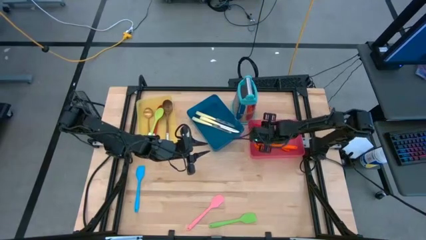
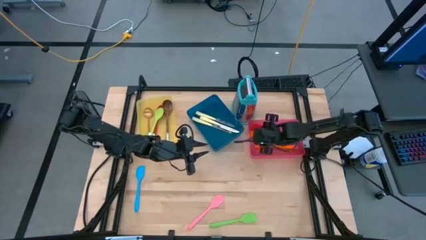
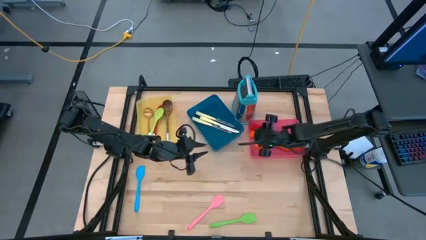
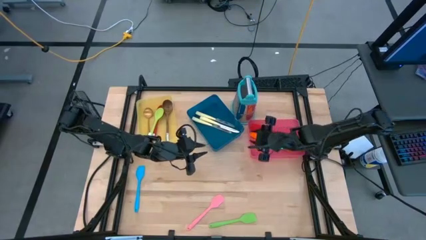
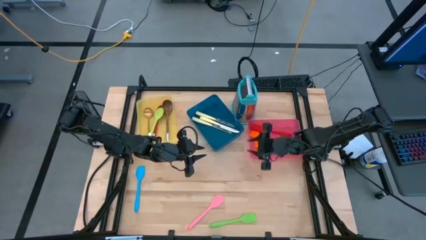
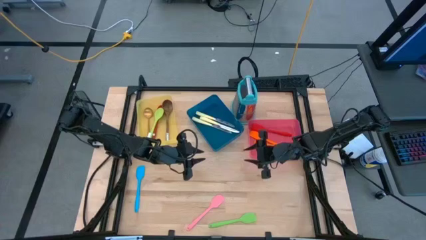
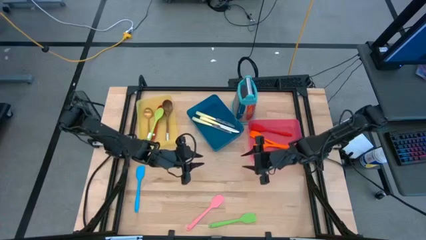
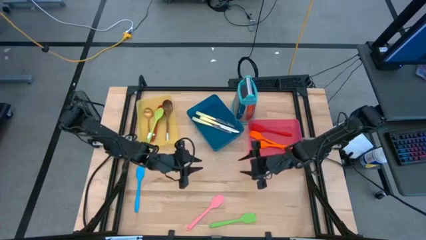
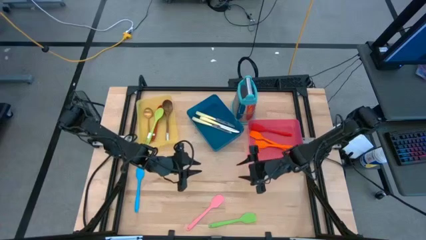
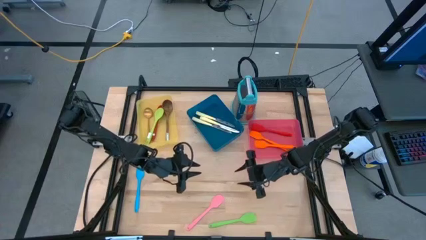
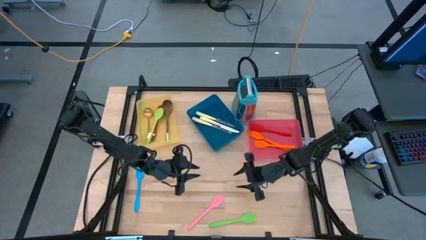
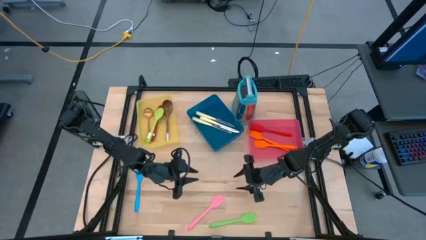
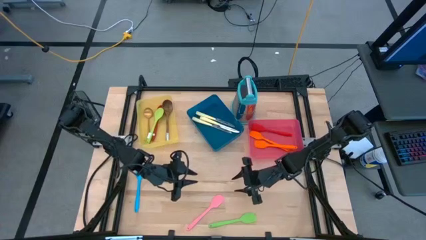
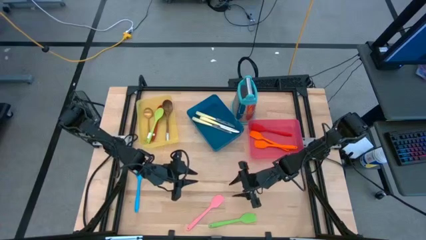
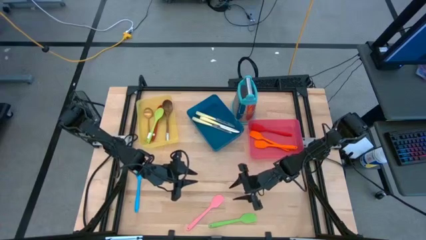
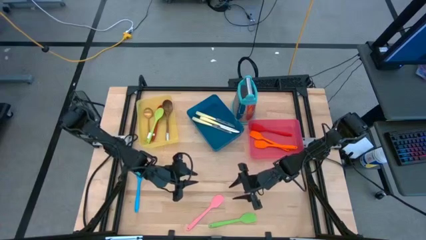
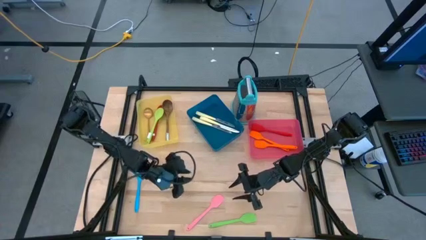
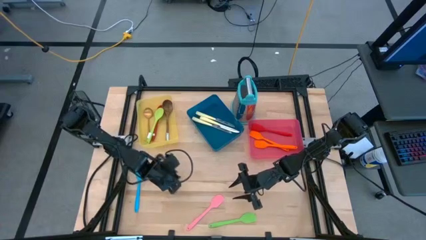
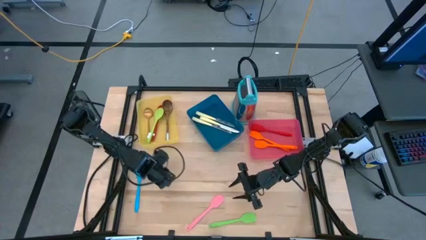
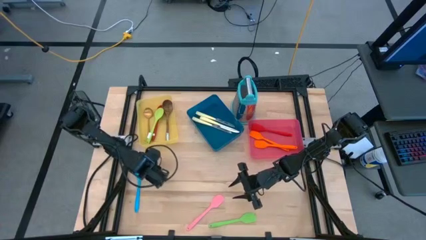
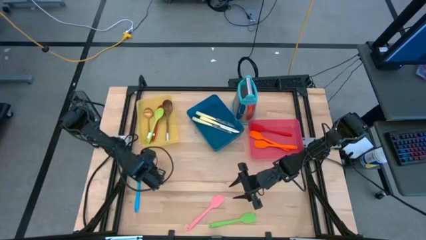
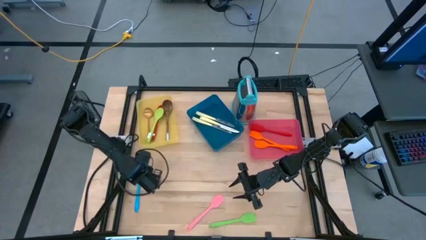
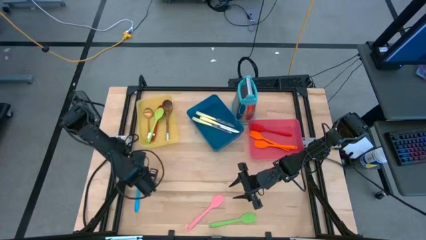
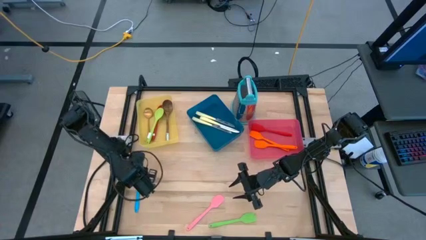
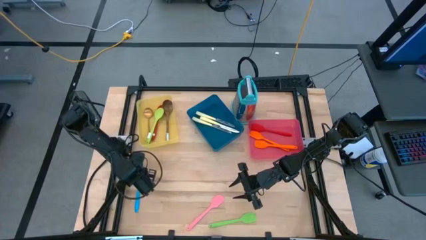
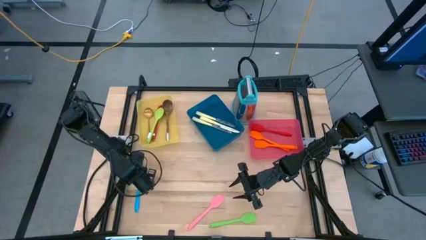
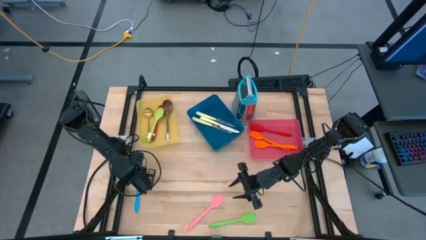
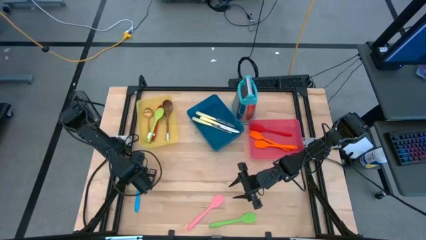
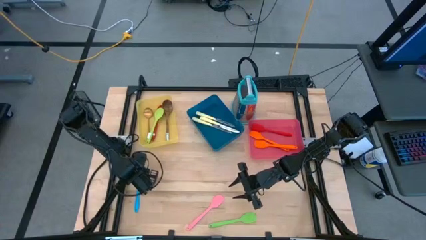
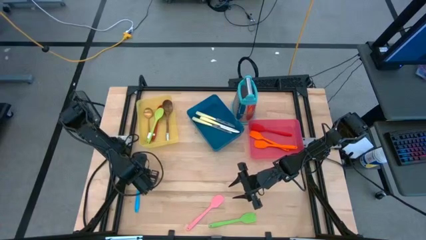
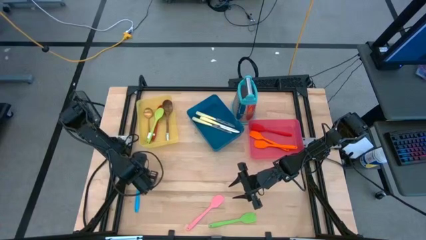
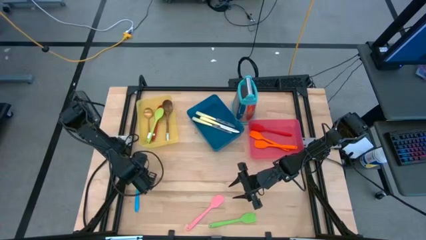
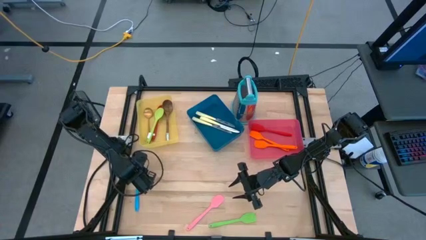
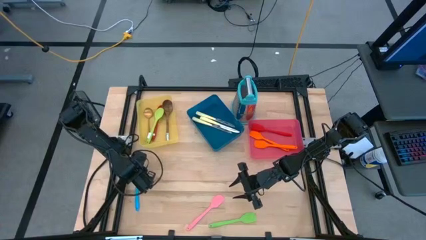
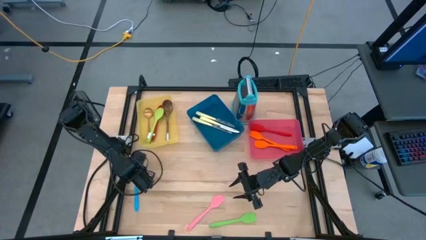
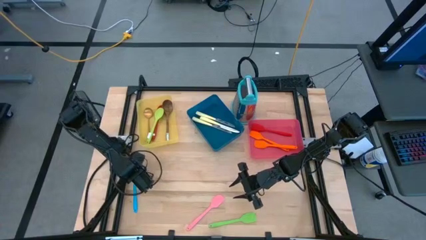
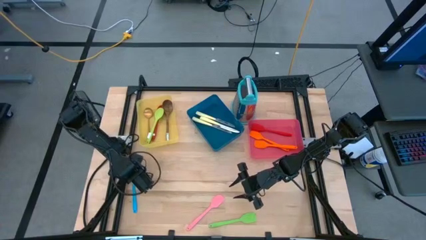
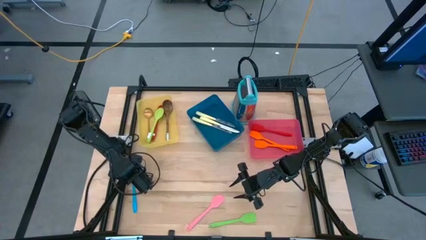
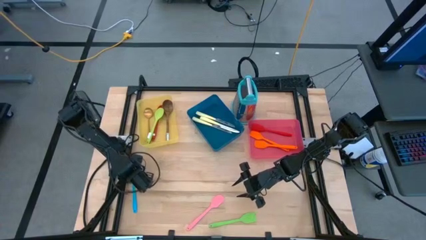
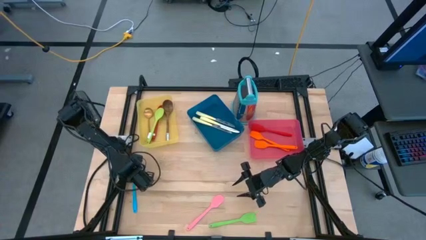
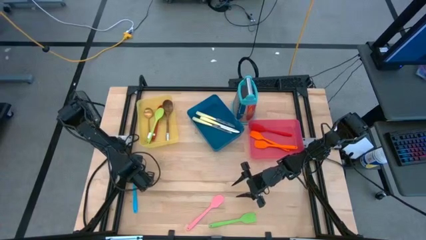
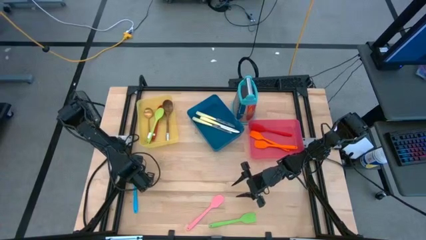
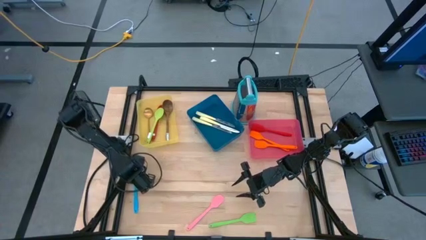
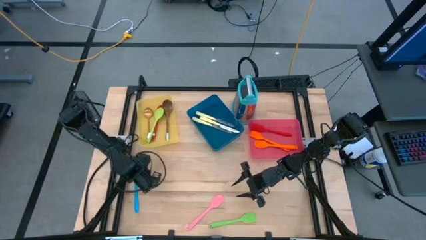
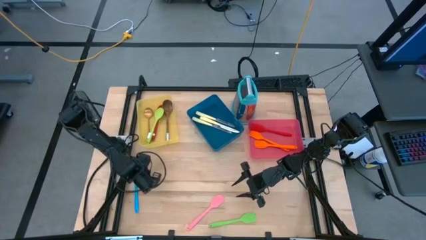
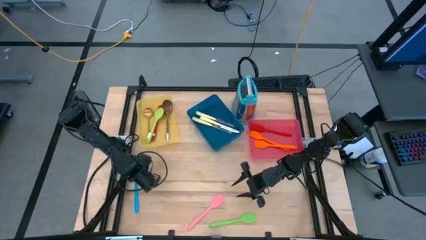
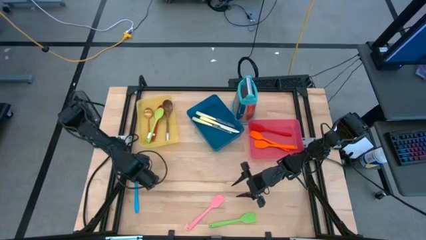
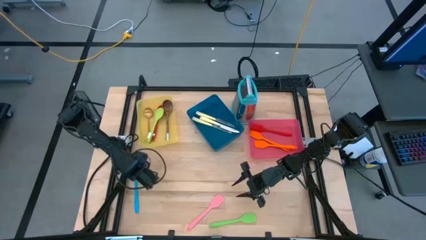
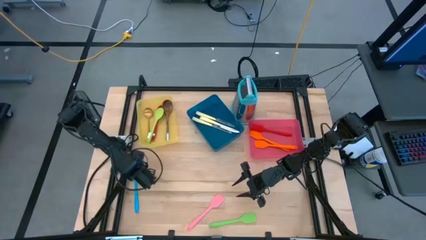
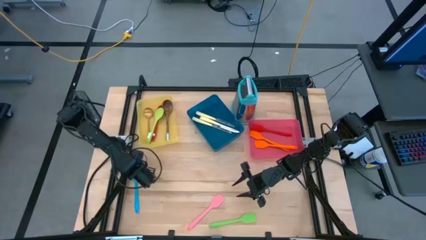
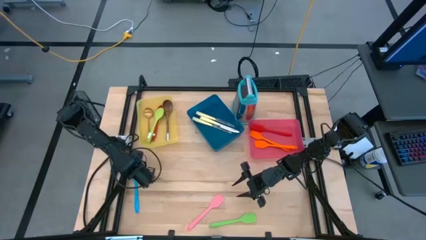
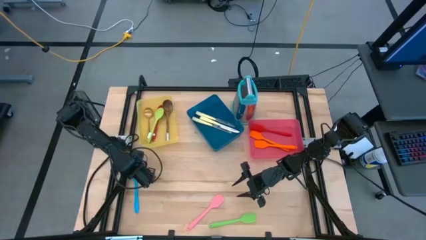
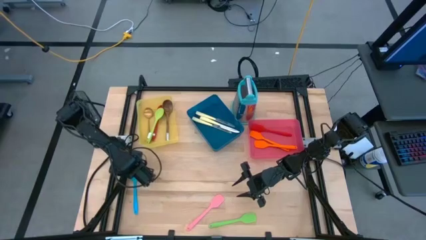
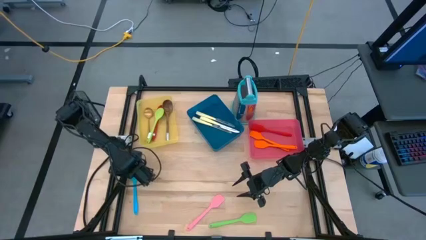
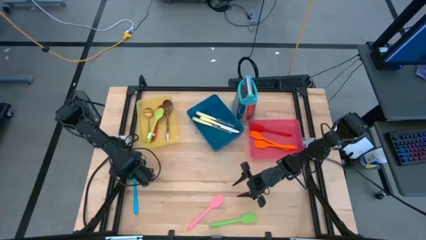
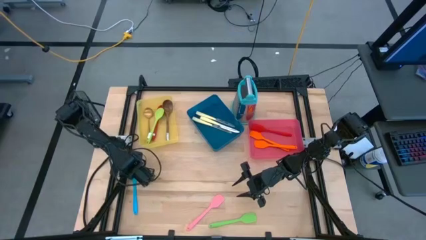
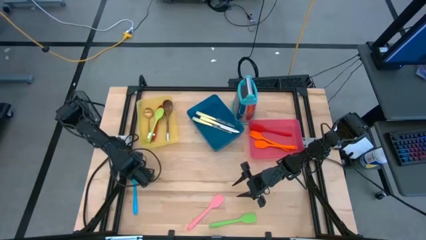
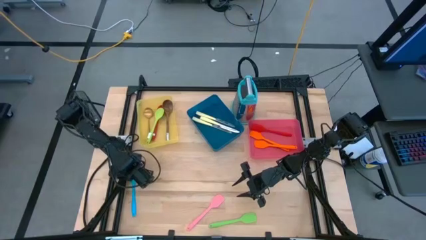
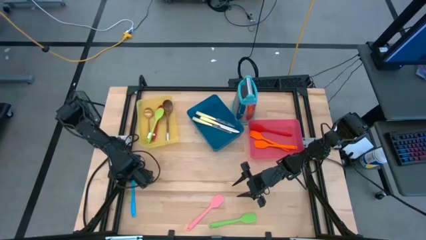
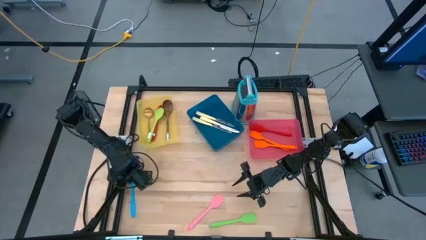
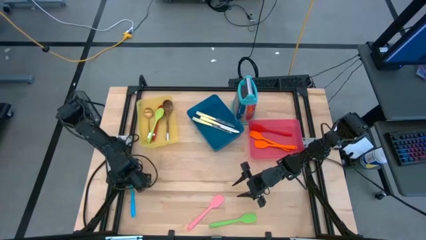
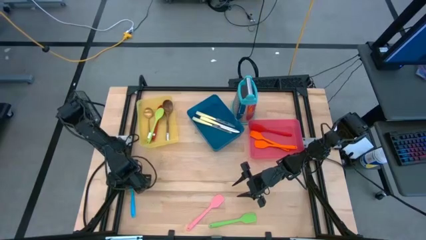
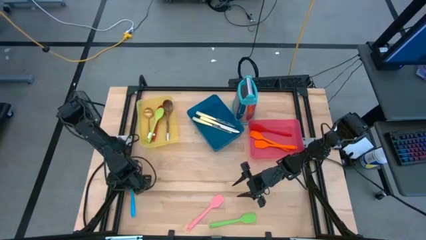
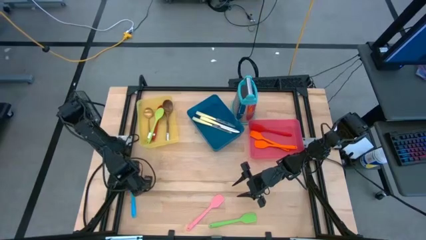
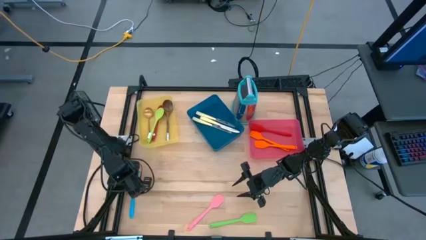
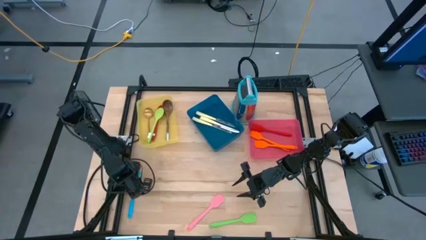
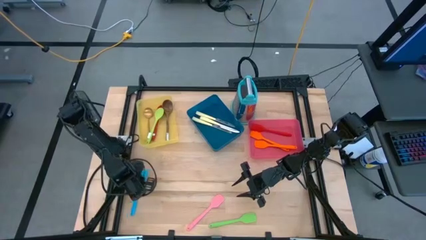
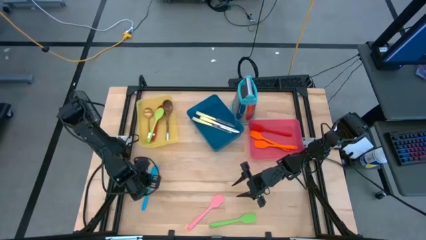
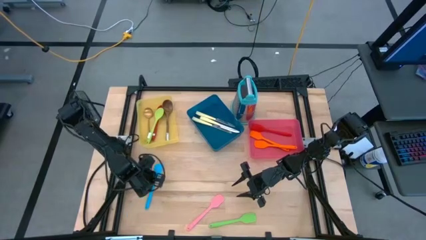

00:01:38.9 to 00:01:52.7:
Task: Pick & Place Kitchen Items
Put the blue spatula into the pink bin

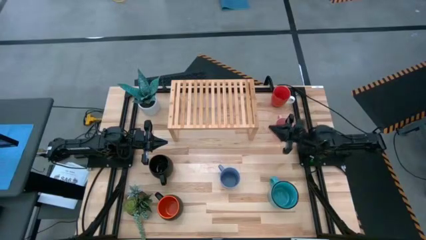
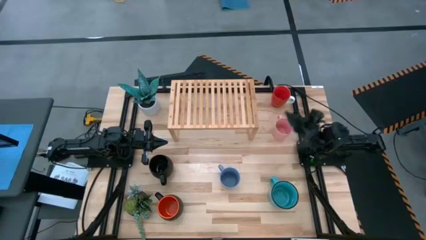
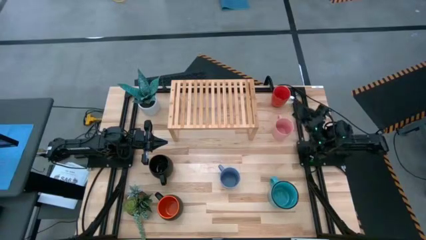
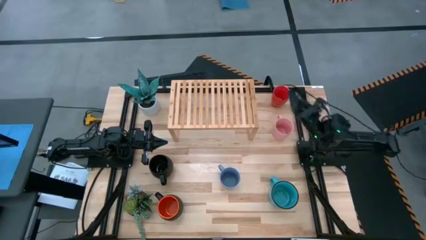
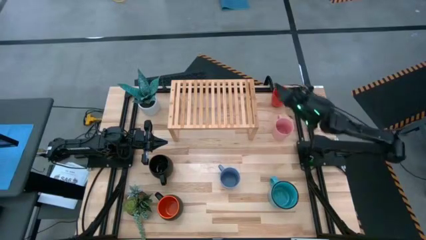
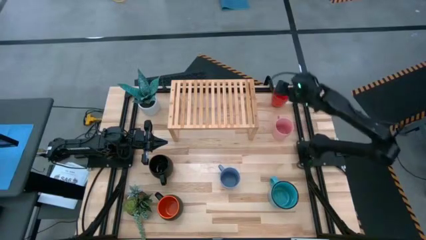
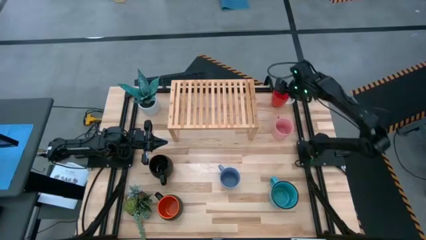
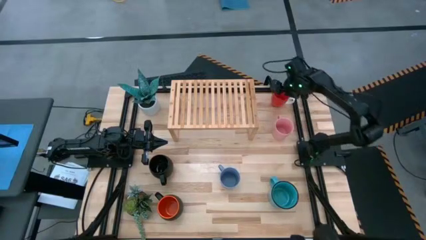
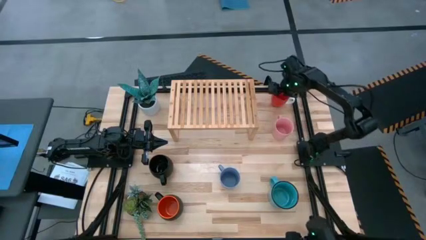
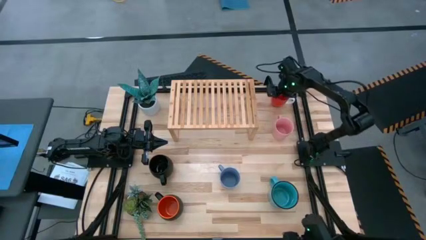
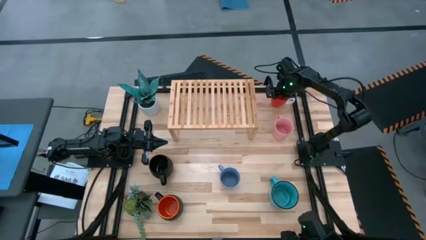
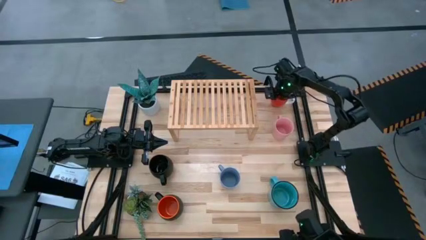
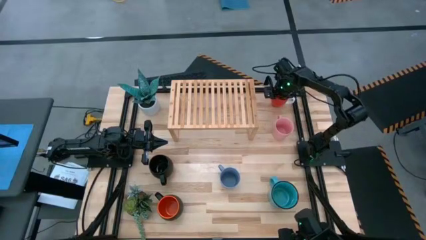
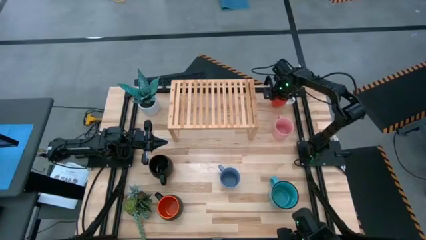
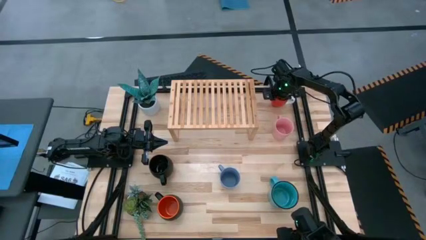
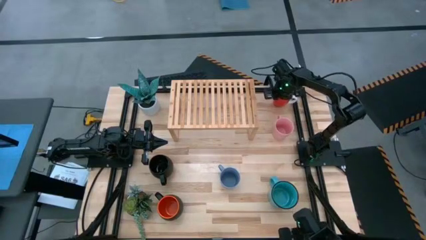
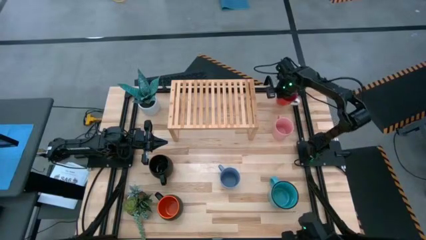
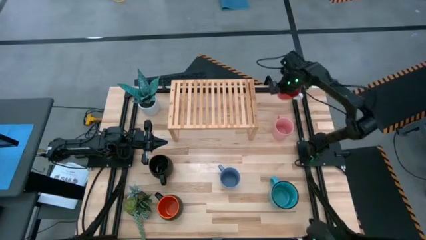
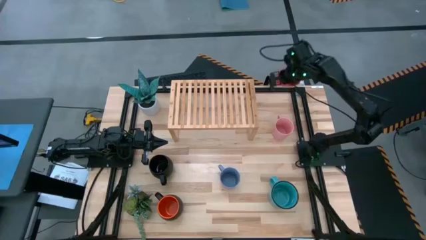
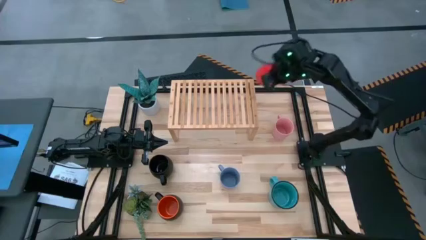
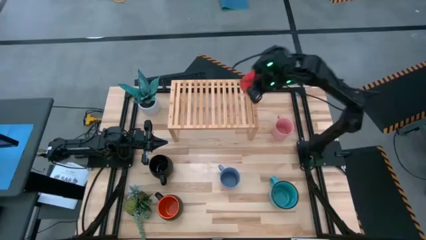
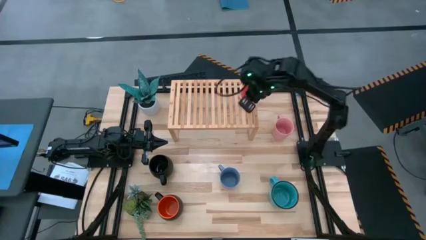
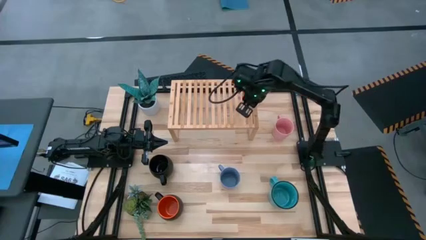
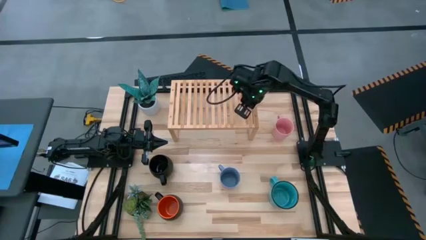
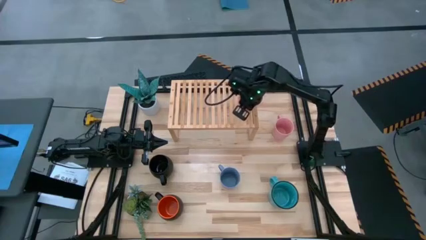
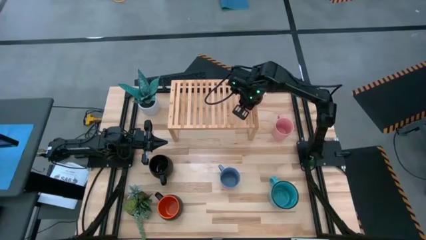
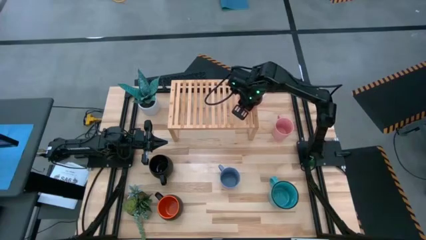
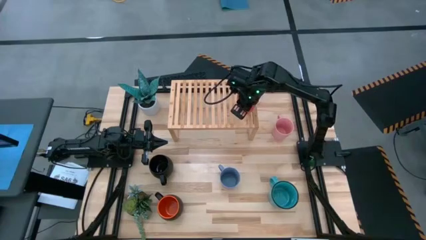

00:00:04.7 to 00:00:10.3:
Task: Place coffee mugs
Put the red mug on the shelf
